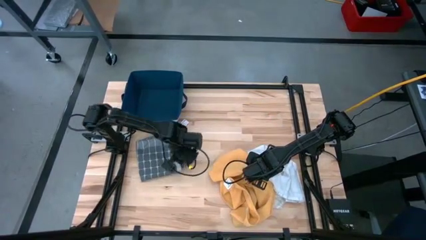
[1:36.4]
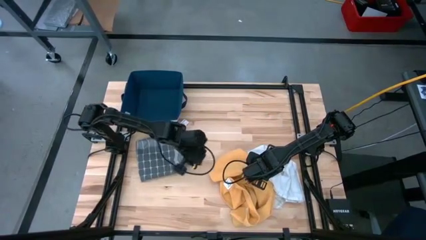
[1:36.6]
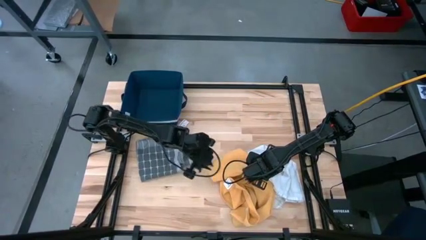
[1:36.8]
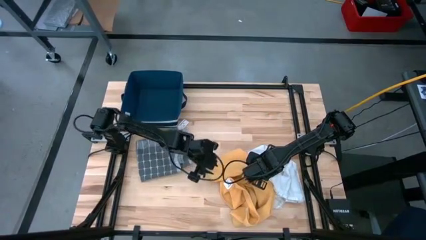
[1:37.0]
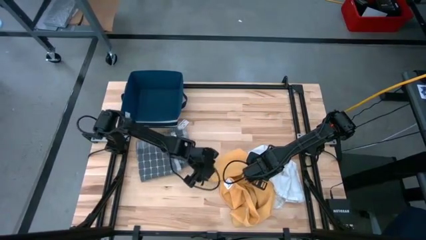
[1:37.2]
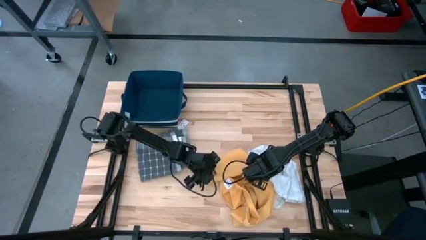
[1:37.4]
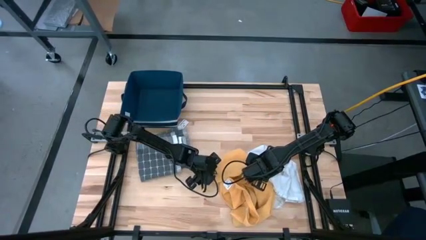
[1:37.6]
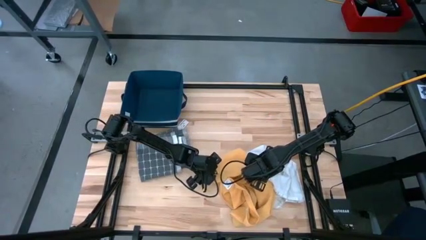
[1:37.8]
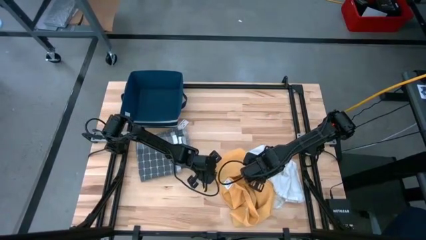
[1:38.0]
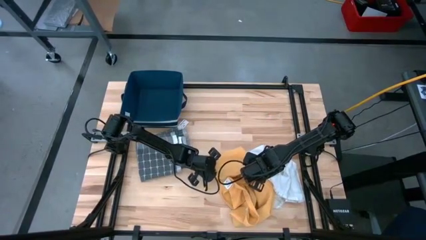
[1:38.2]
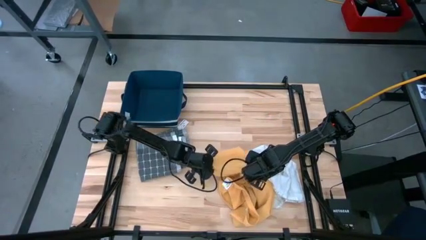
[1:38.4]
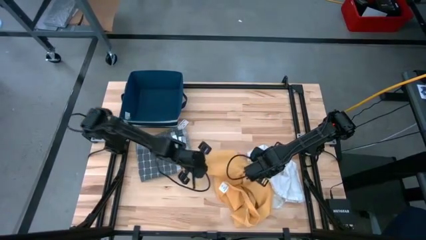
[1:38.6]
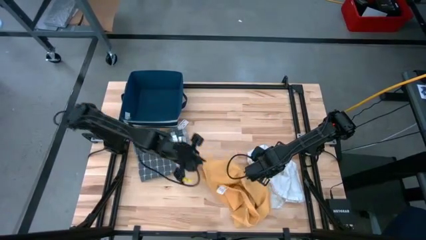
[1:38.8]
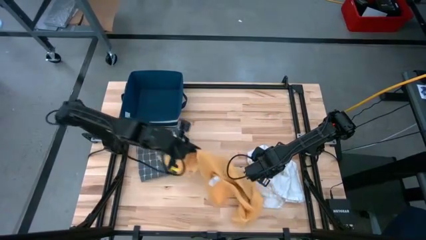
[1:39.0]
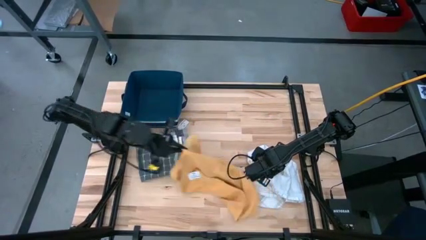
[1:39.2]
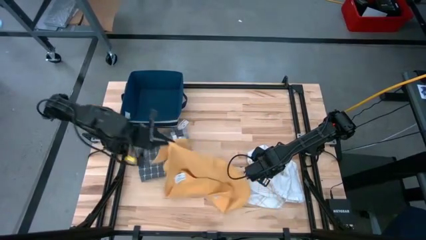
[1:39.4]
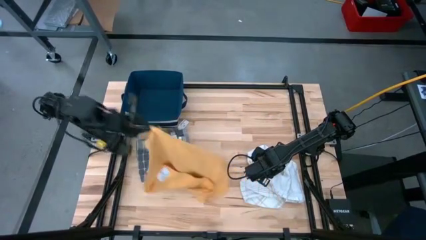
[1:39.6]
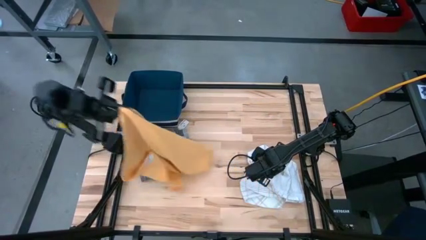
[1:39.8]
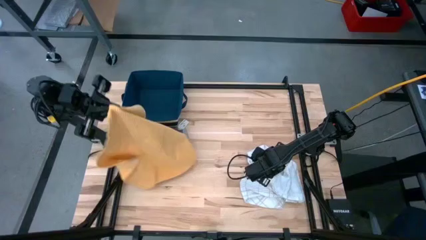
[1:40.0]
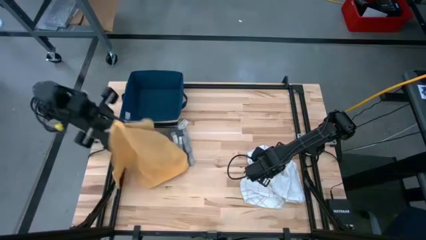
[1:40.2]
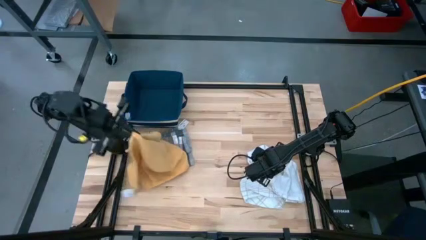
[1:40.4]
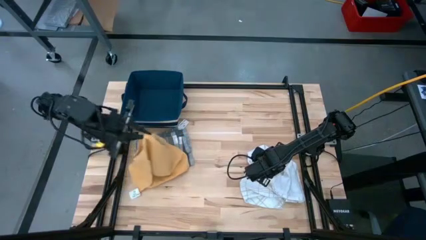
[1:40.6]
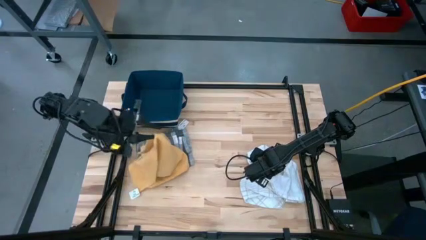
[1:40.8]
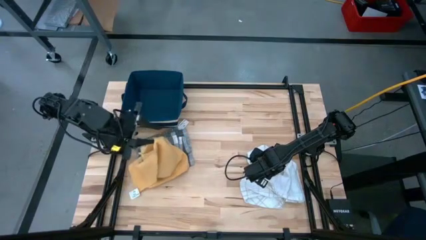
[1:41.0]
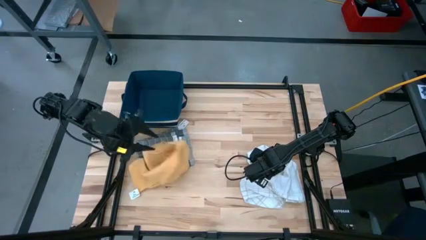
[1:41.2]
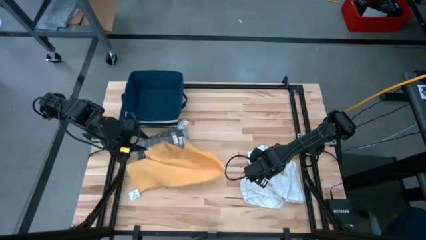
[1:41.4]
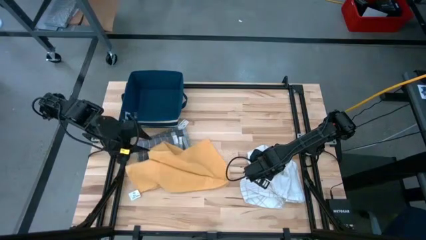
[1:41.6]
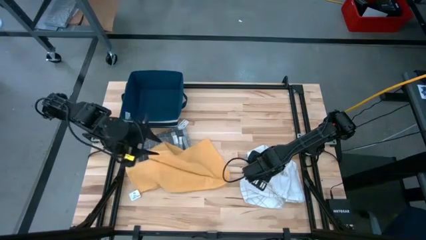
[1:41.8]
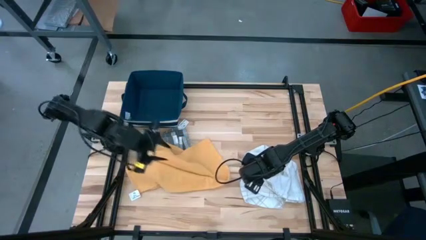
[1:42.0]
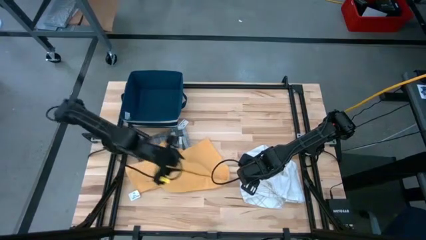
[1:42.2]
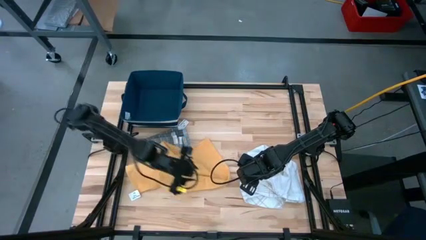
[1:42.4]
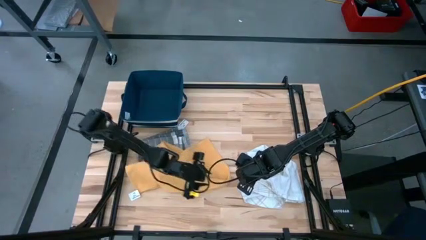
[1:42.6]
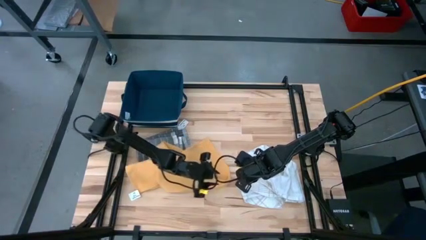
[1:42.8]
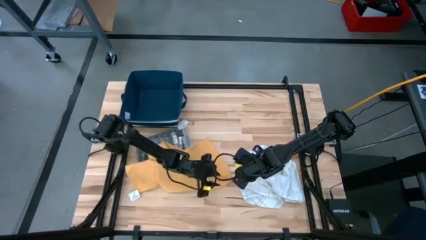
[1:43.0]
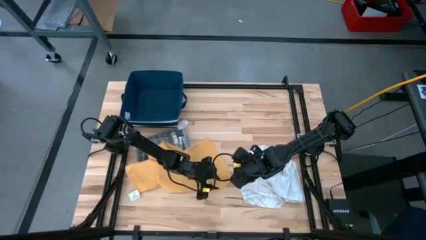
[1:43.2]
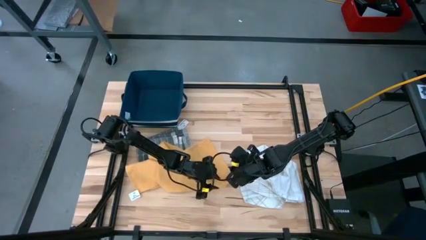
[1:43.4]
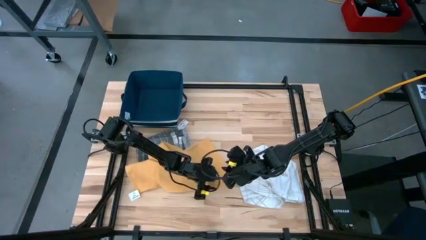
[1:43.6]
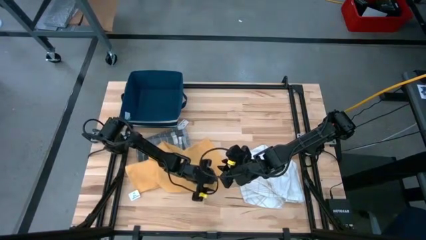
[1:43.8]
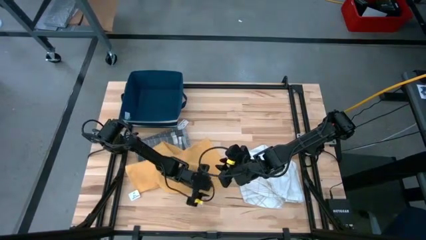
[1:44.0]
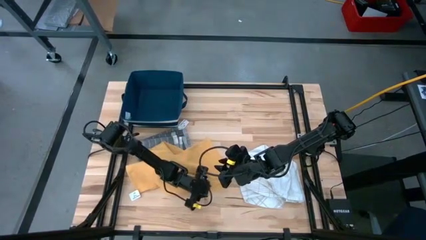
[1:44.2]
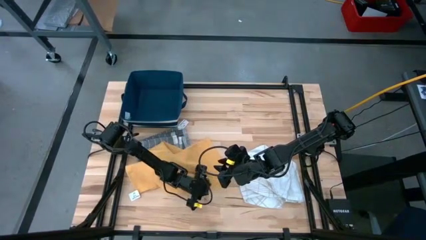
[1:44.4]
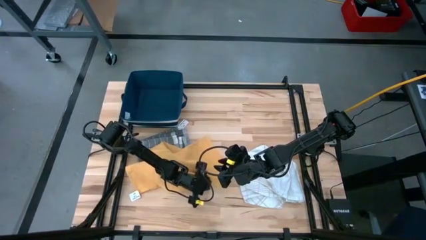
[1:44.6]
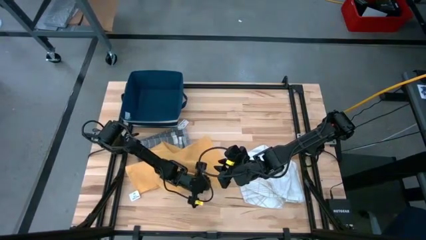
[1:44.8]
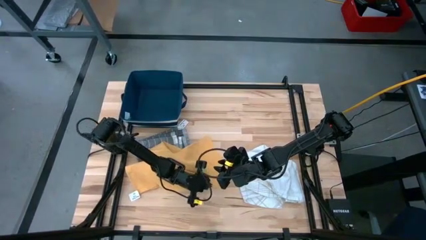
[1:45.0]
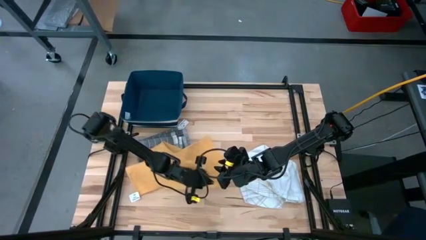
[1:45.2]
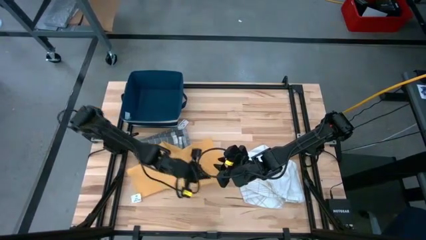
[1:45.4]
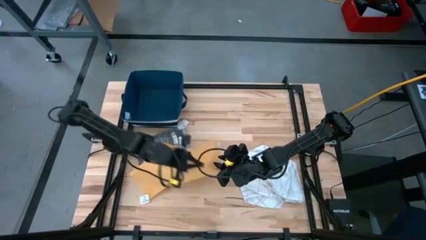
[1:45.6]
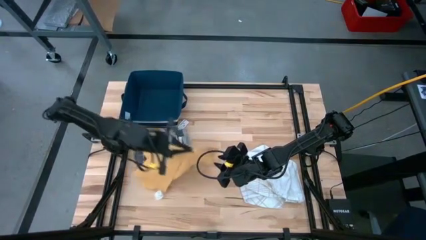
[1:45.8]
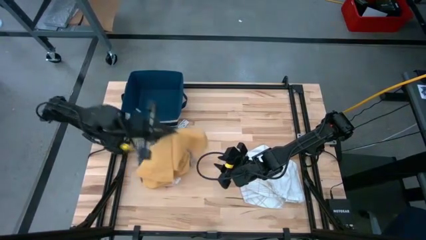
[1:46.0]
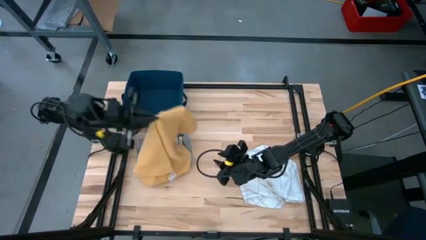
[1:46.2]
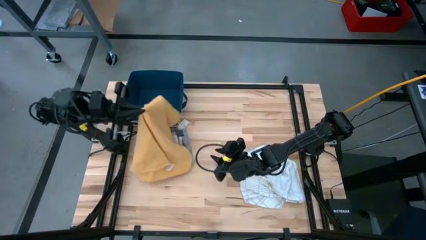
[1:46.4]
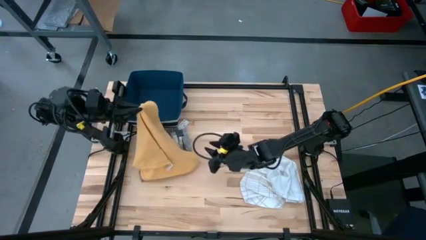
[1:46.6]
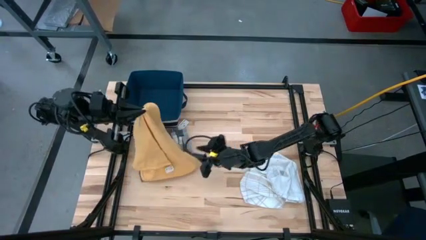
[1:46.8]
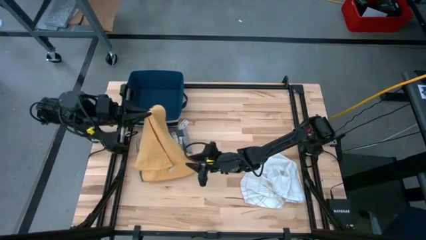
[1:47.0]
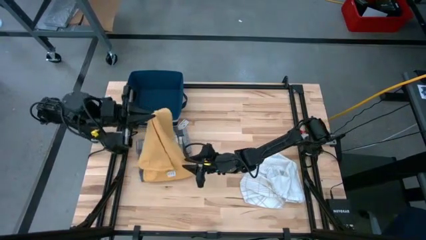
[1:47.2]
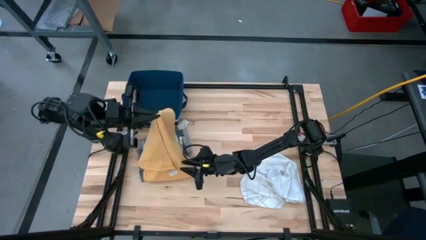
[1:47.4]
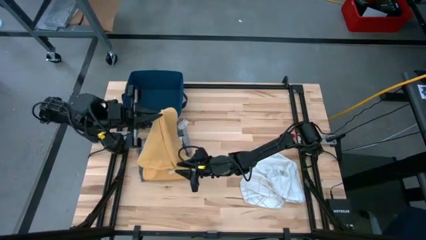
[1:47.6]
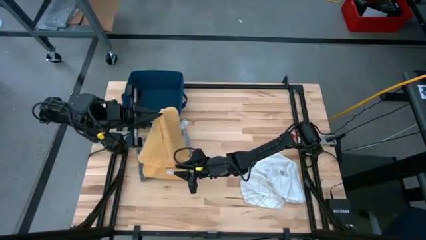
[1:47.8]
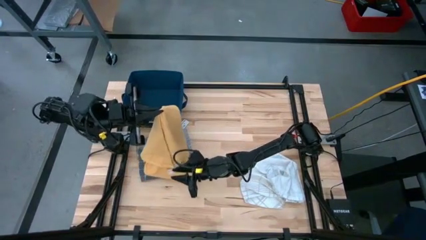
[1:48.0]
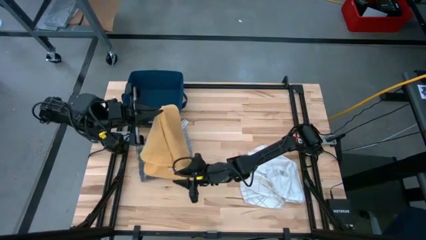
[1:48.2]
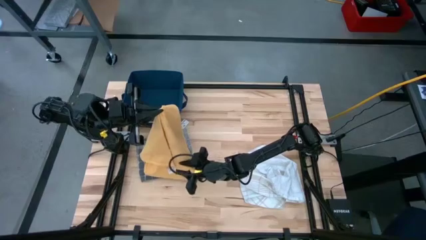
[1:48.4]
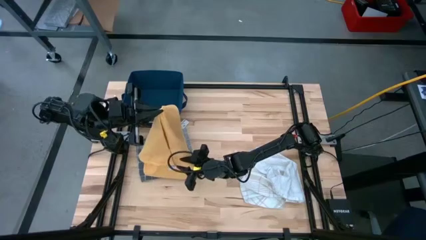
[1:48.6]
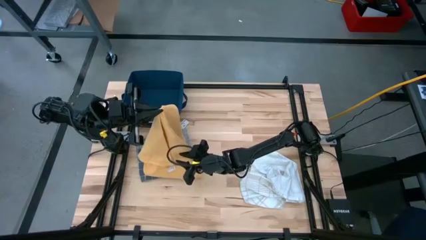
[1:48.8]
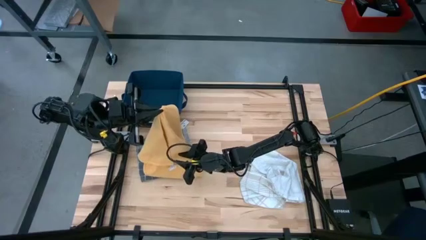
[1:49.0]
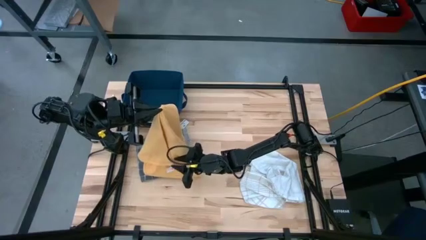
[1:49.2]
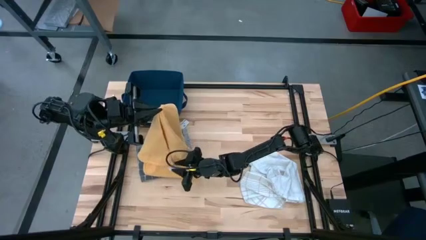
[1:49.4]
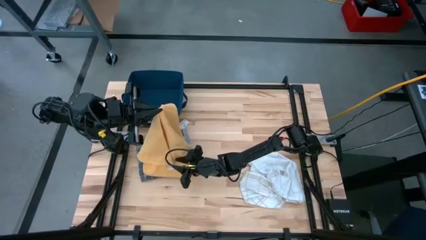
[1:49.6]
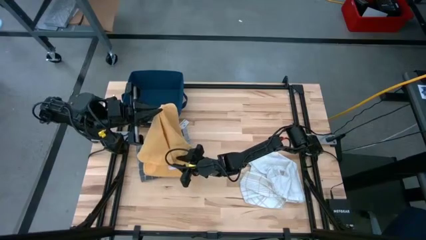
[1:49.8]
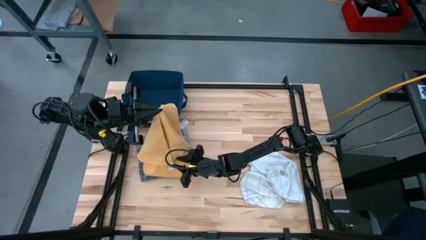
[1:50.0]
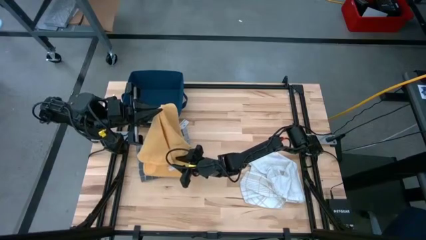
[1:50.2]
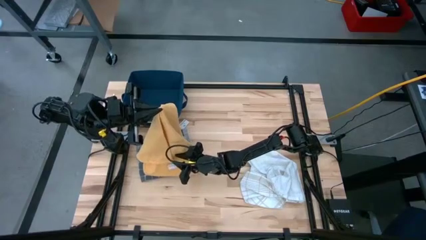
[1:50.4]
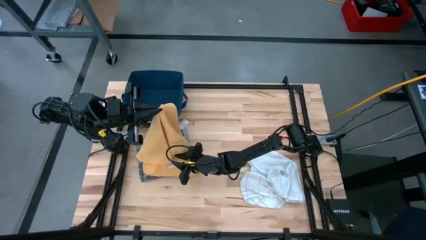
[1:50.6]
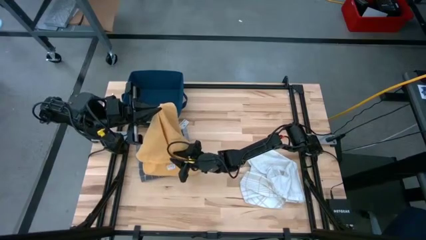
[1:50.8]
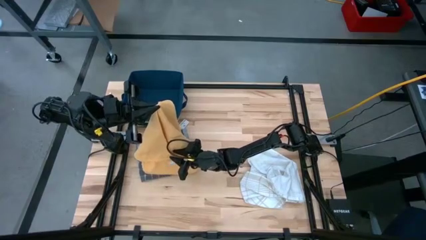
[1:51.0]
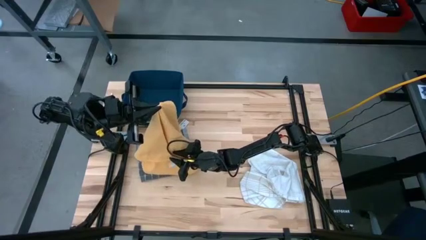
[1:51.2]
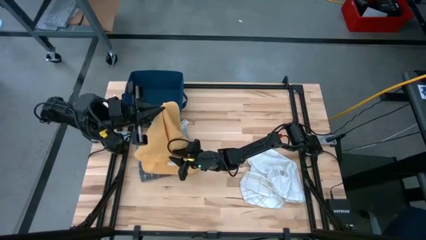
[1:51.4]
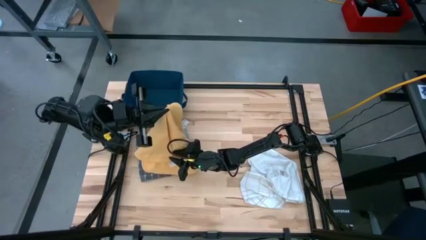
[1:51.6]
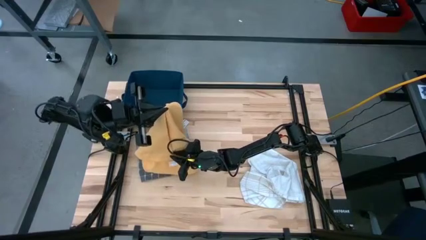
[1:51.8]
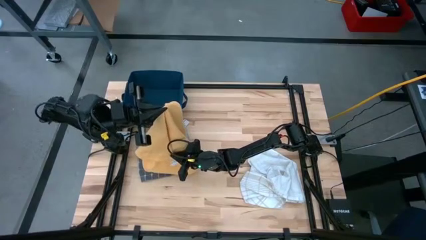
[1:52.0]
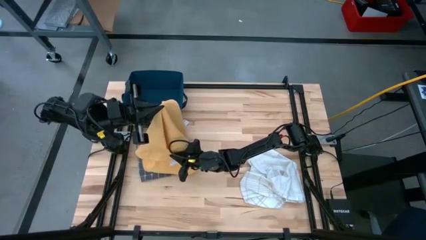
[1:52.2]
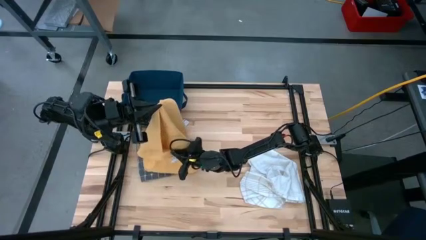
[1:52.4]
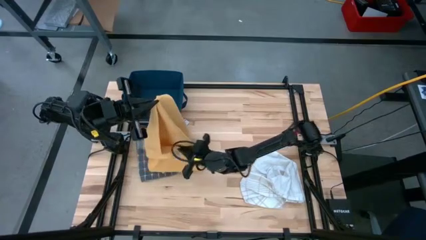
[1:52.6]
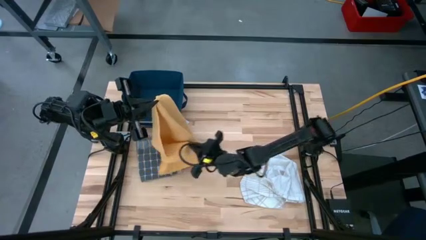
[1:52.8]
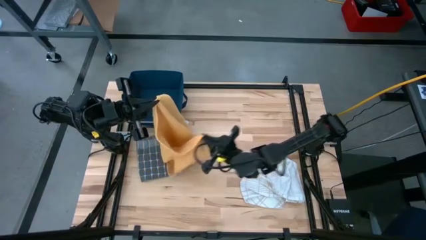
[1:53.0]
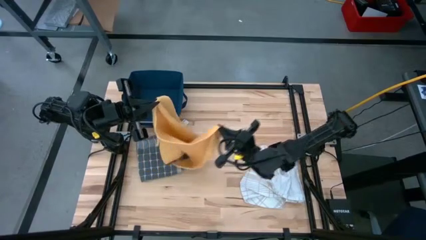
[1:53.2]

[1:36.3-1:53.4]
Task: Fold towel
Fold the yellow towel
